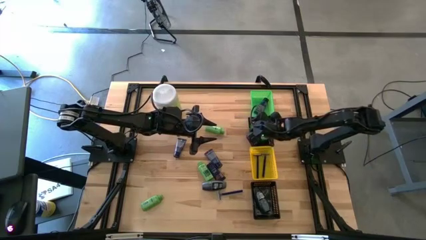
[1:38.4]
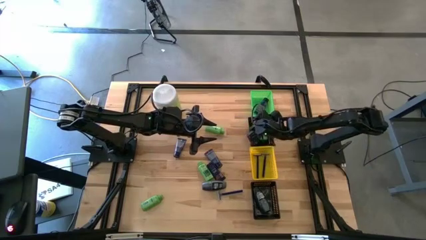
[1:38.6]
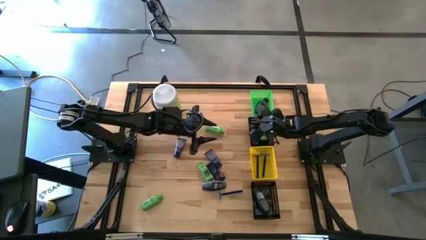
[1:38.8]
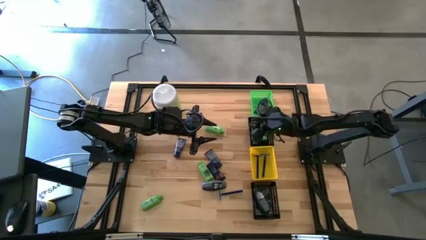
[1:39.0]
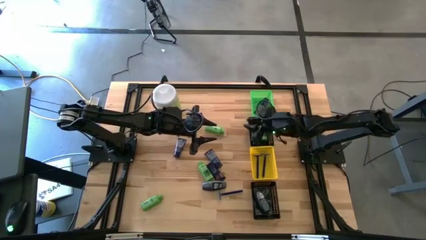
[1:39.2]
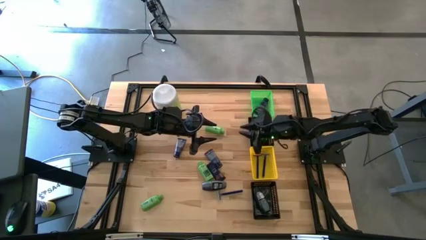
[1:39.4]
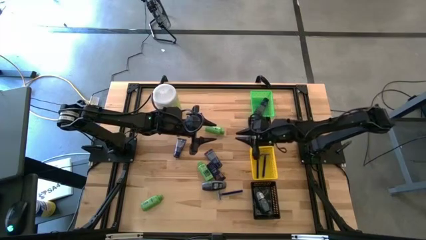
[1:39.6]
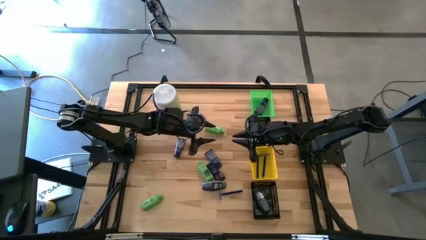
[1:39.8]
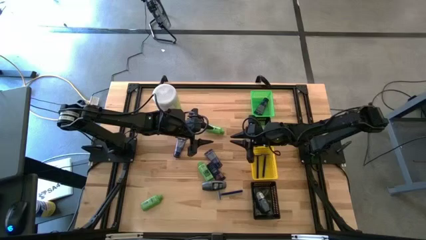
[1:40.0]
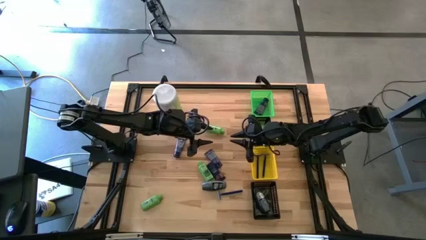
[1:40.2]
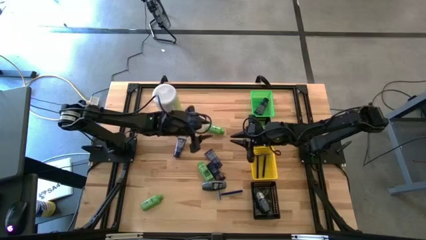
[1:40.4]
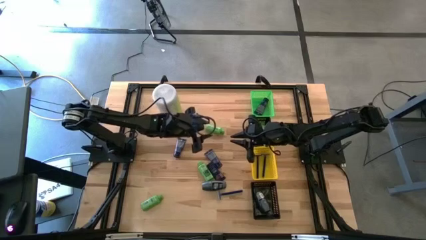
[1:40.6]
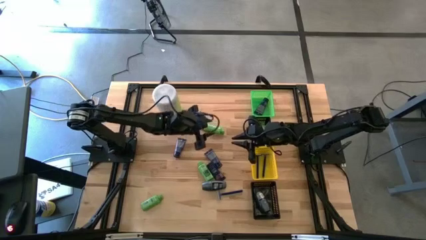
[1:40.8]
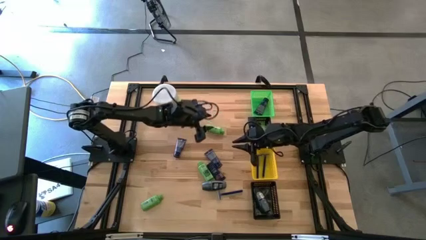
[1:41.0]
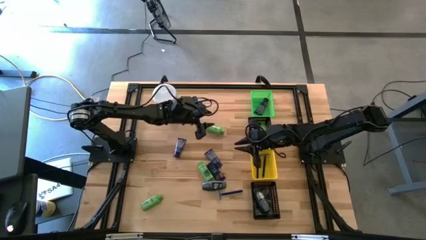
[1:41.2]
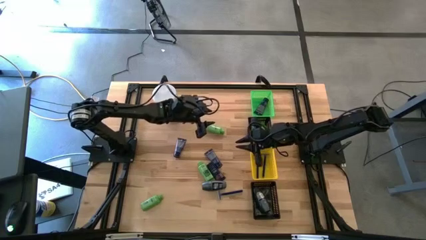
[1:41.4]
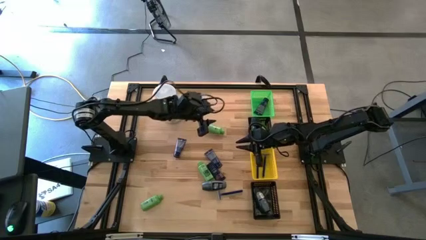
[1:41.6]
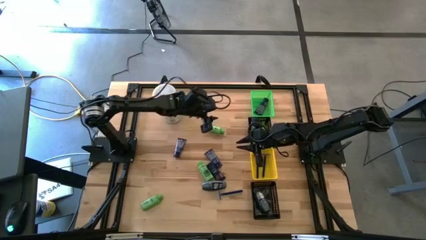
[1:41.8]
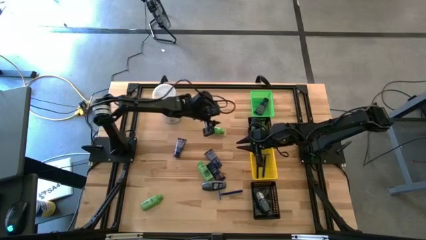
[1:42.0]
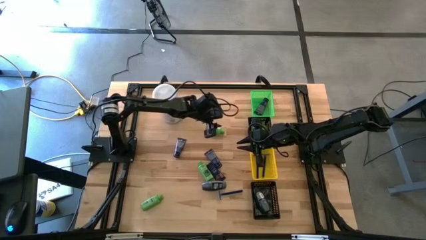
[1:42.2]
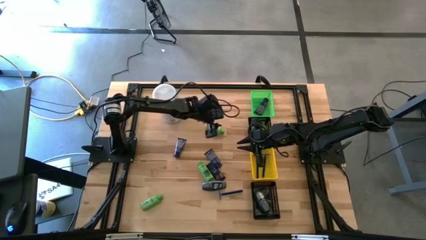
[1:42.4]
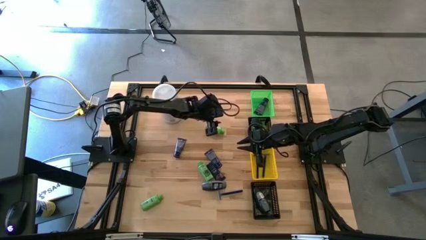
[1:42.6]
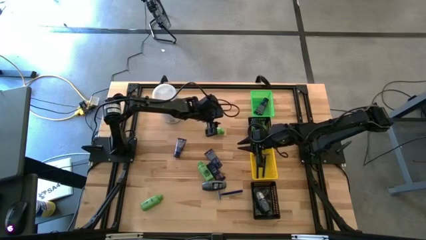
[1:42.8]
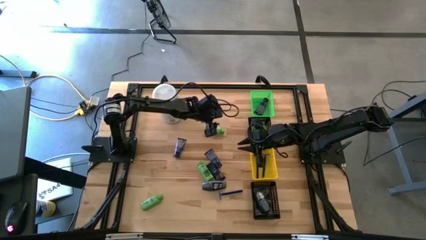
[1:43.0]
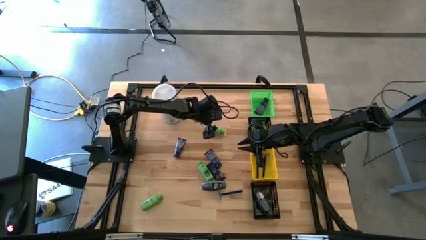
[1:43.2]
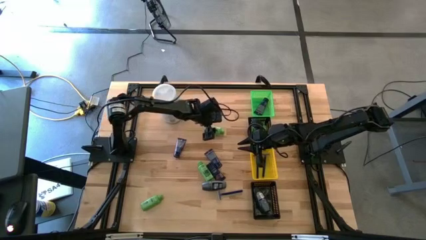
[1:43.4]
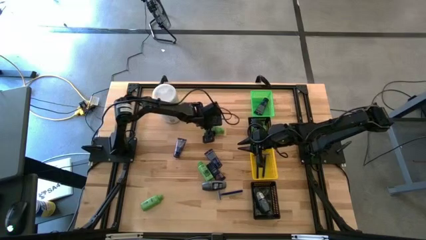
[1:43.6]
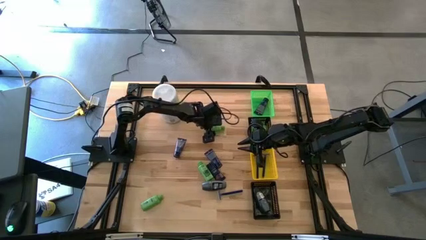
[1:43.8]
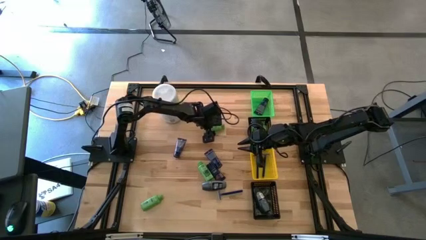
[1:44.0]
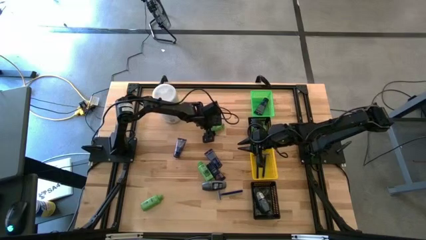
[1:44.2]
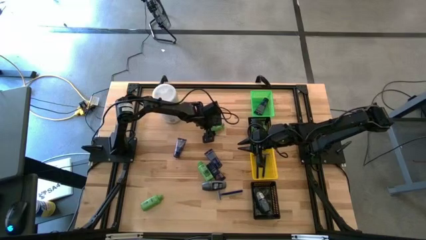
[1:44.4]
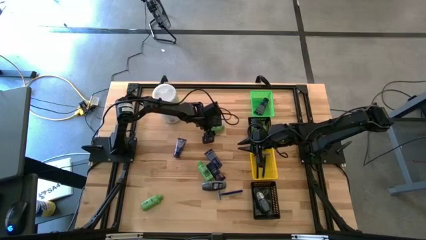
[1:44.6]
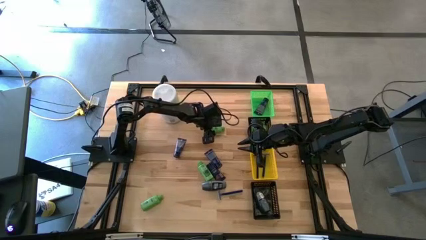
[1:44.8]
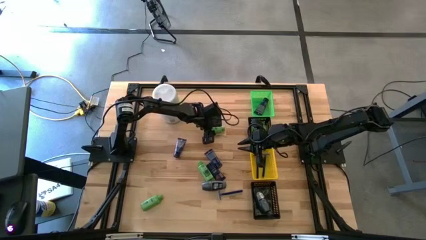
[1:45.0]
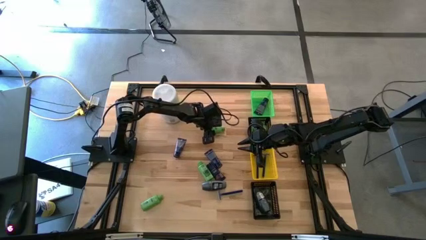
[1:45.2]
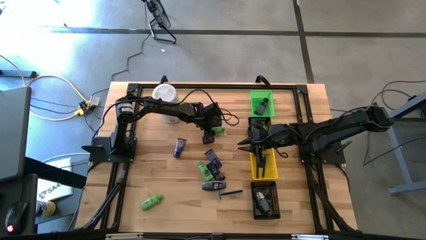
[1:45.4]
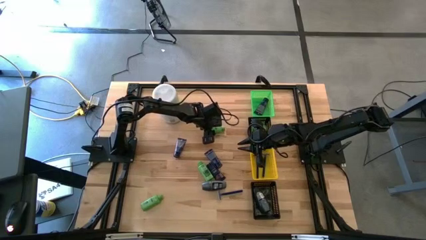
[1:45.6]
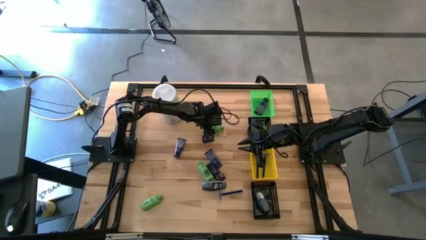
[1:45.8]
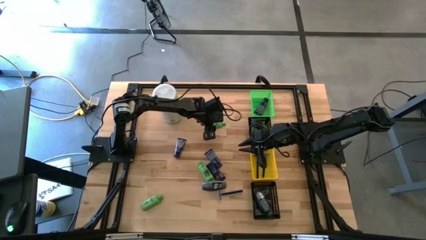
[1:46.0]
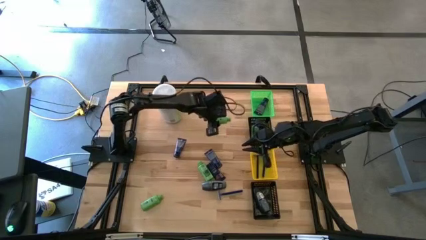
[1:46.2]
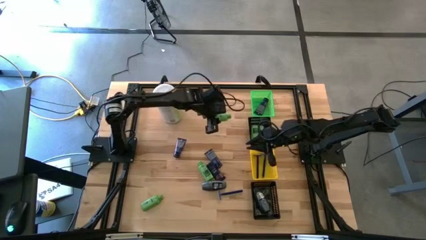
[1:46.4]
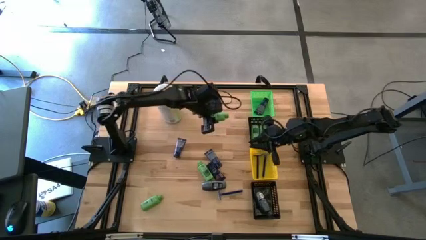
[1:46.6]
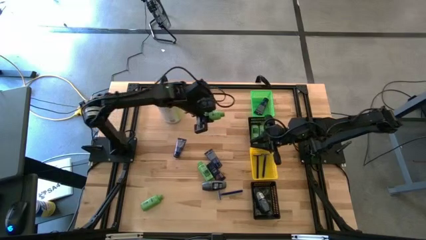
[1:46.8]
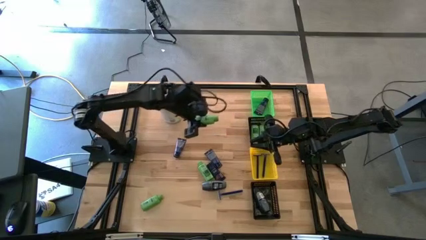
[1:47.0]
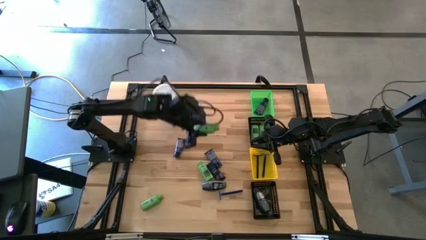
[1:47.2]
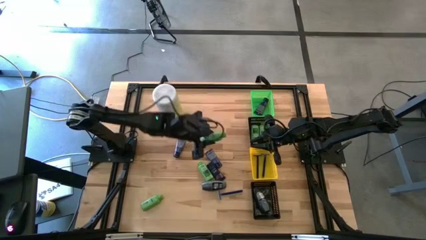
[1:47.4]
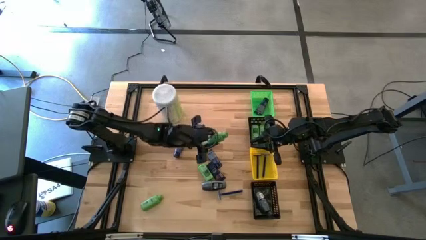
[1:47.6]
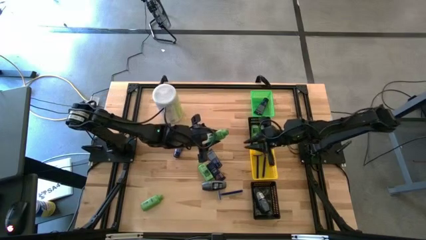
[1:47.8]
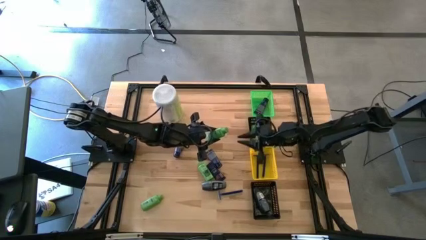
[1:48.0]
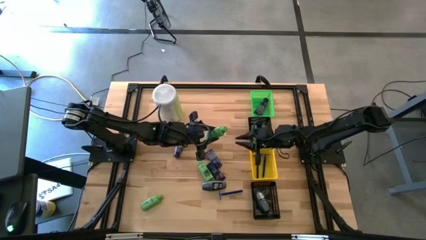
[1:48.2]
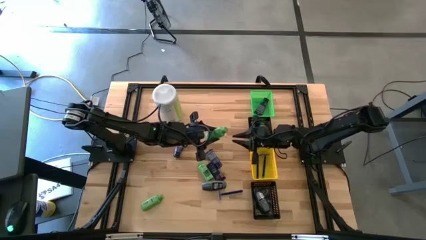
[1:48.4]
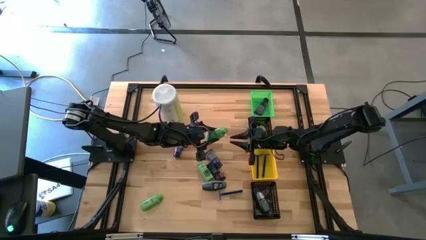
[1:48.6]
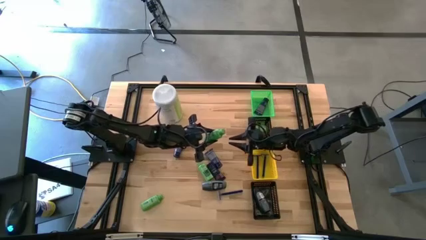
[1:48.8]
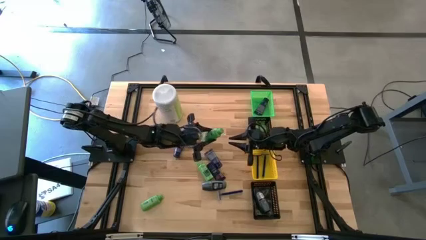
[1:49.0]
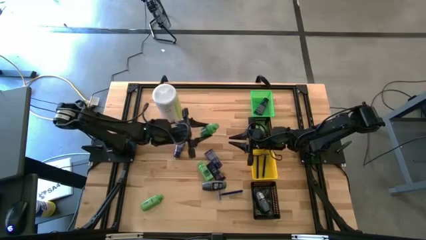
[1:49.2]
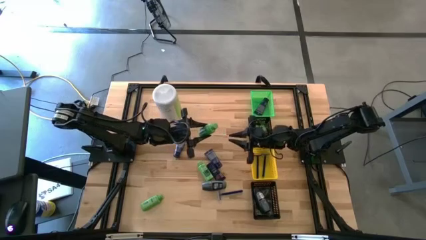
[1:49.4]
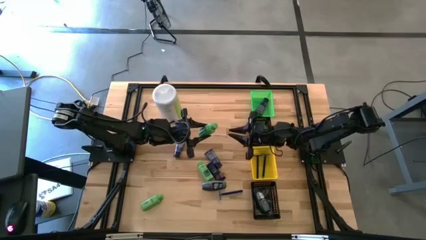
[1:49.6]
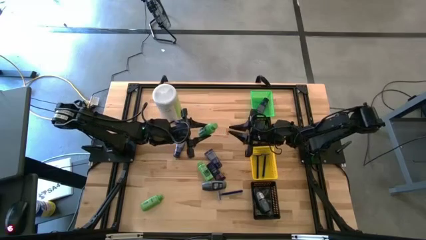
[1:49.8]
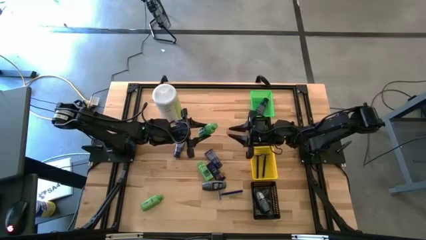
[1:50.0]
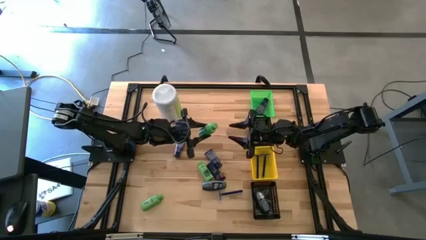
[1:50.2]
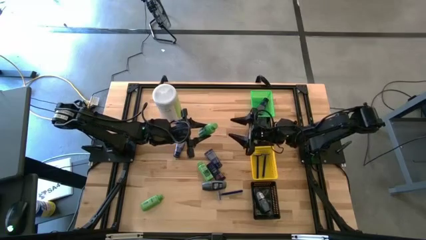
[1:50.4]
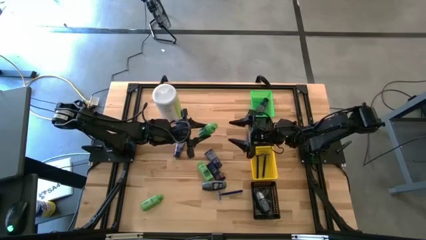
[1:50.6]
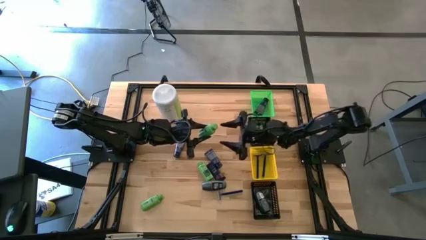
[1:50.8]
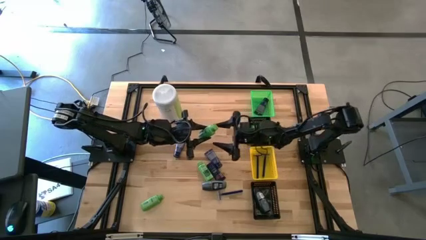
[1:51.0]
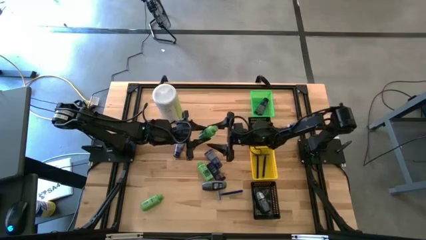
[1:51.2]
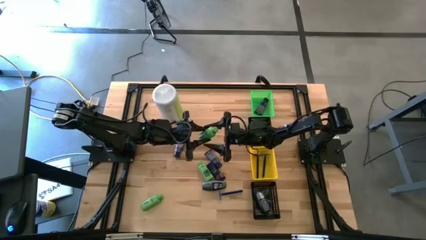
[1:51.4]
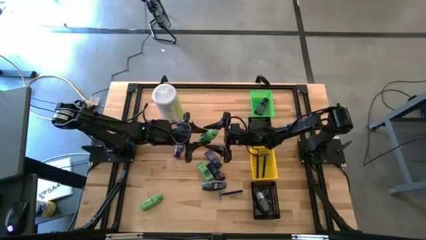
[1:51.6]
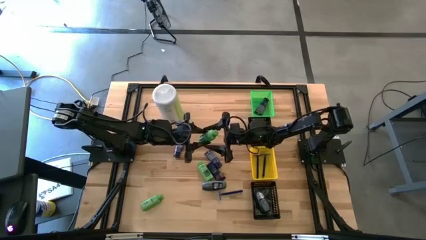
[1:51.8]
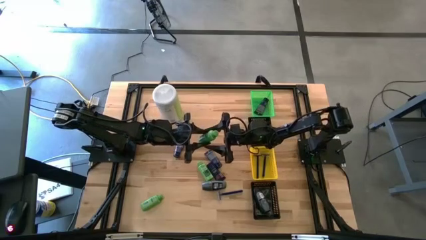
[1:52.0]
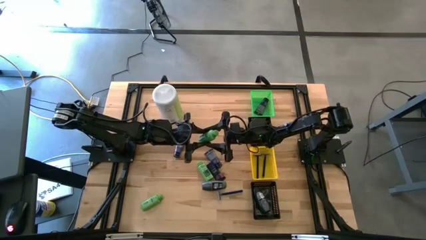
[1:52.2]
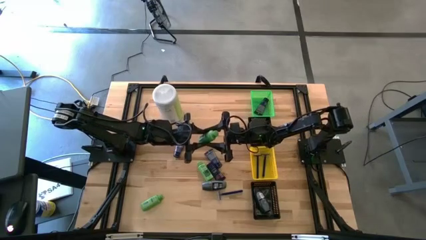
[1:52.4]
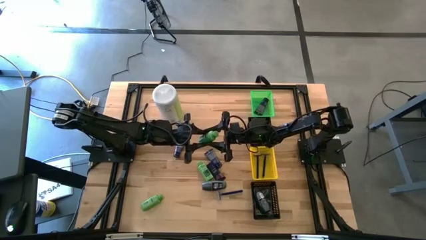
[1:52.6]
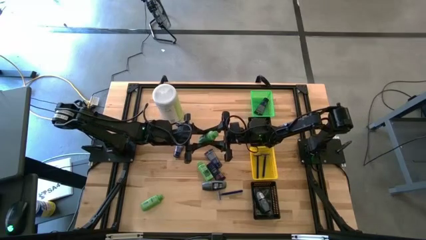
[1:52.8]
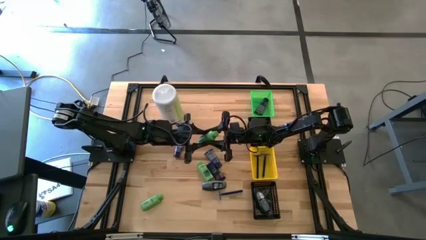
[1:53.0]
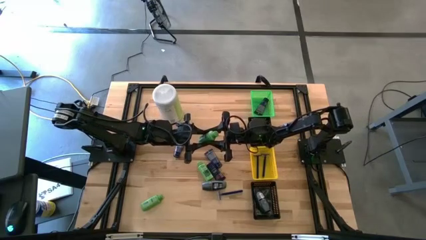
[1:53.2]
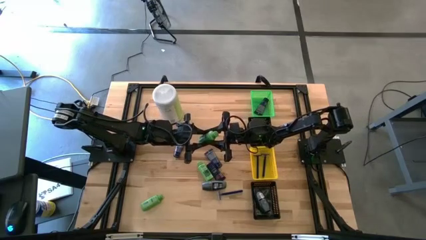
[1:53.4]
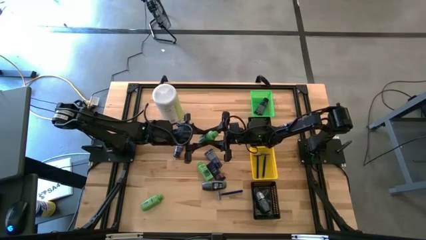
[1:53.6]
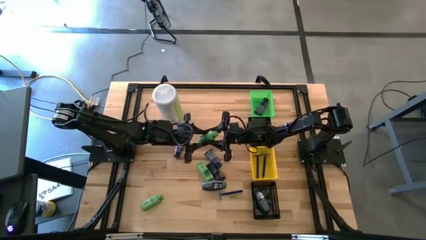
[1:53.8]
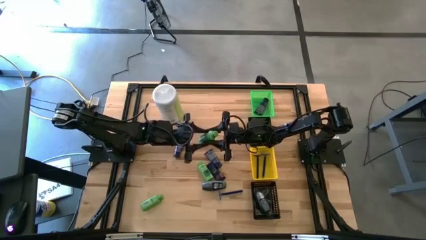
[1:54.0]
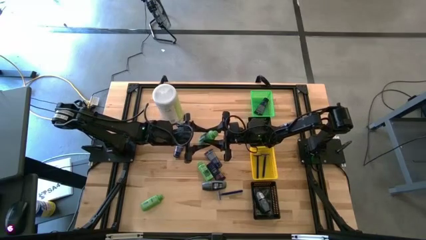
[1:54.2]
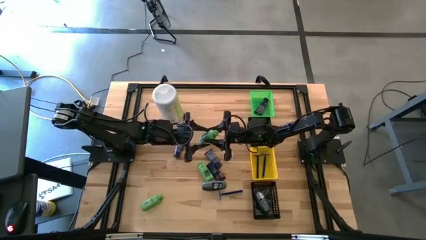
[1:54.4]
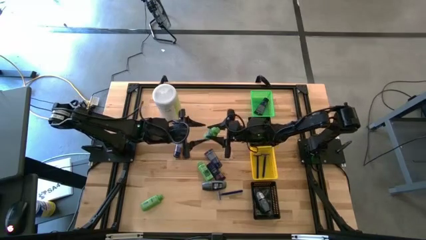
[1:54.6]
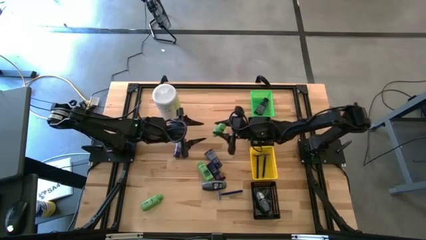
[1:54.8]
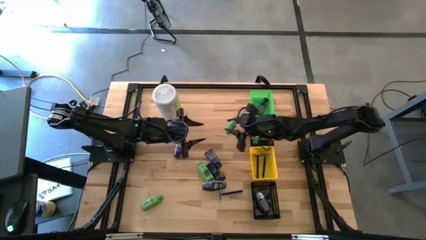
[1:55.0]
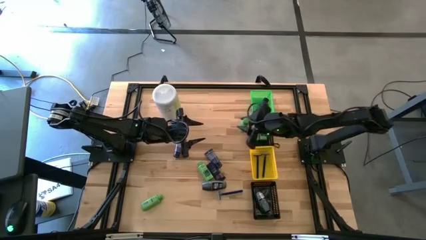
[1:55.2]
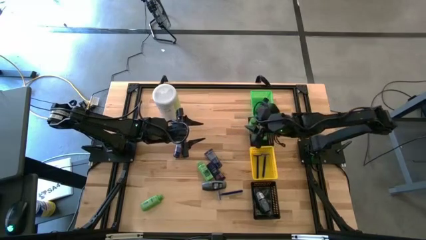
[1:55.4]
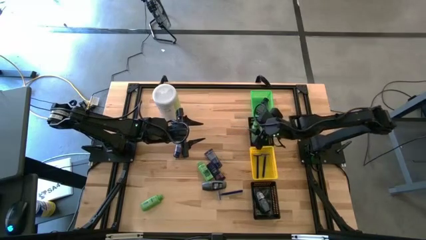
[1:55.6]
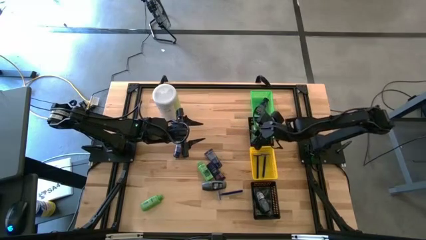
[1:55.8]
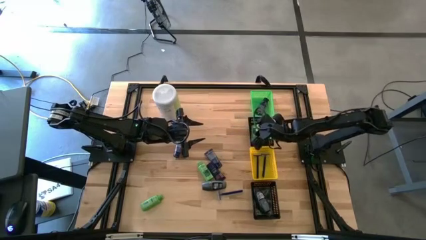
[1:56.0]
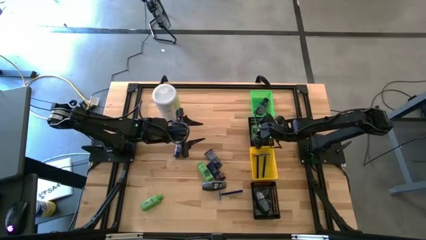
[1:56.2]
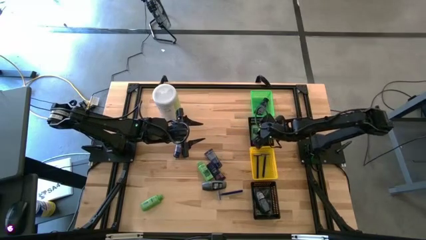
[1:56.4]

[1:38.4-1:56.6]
Task: Pick & Place Travel size toiletries
Put the green shampoo into the top black basket
